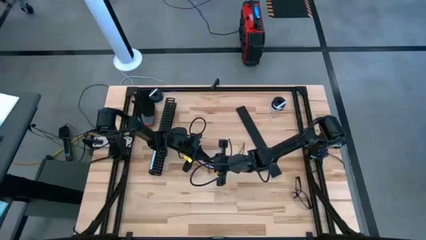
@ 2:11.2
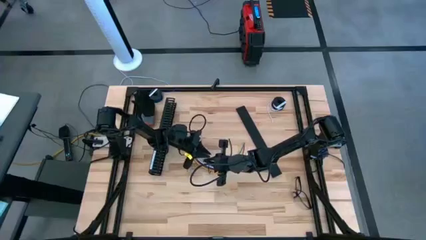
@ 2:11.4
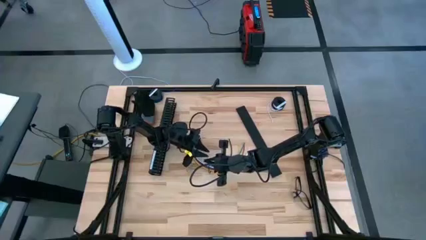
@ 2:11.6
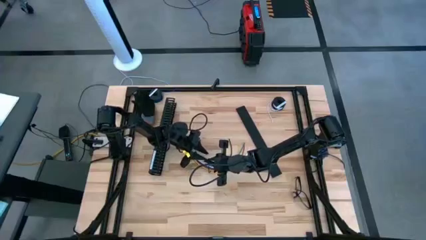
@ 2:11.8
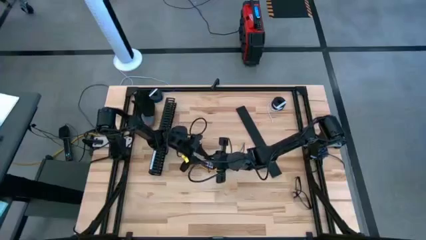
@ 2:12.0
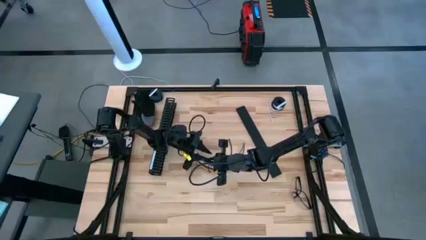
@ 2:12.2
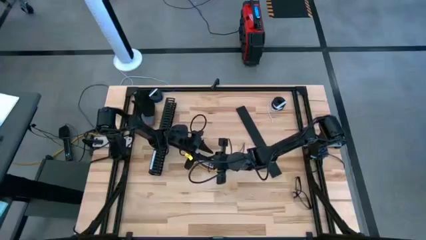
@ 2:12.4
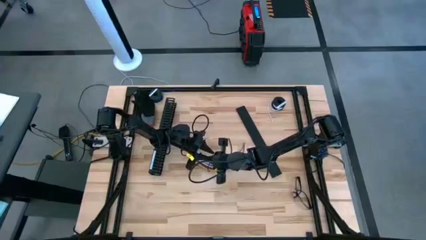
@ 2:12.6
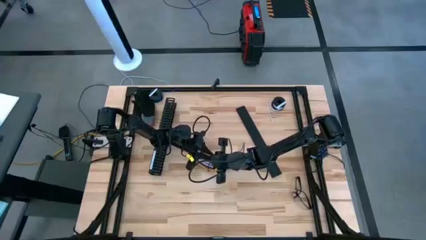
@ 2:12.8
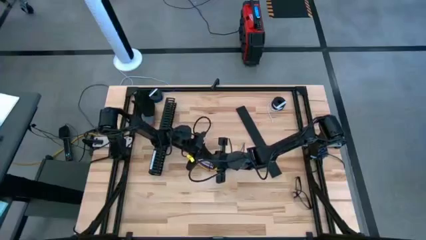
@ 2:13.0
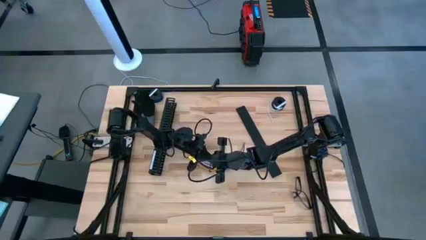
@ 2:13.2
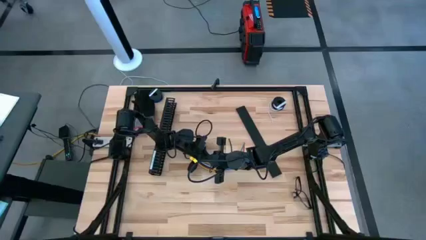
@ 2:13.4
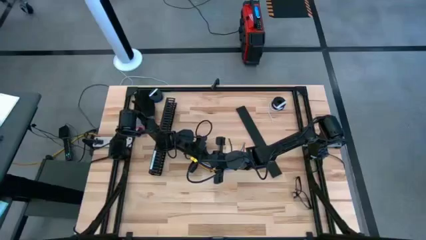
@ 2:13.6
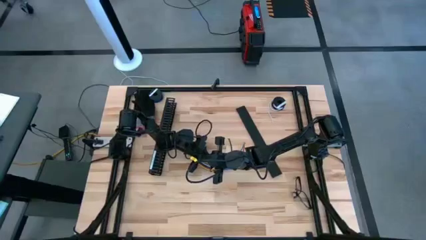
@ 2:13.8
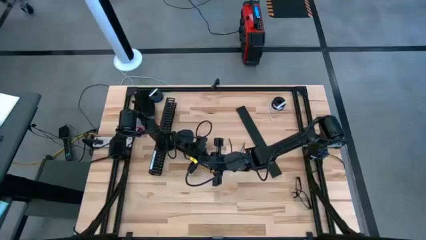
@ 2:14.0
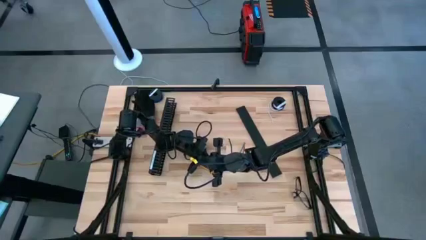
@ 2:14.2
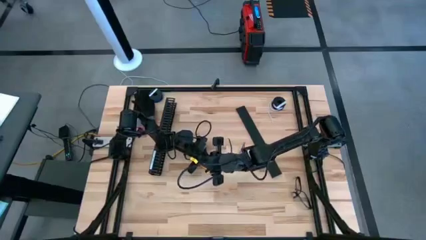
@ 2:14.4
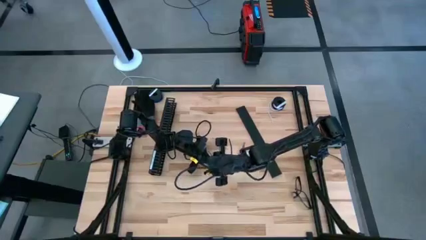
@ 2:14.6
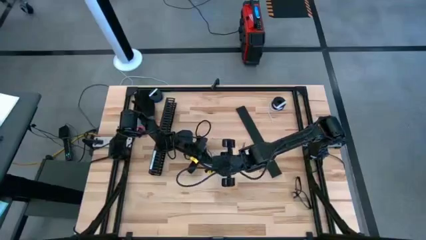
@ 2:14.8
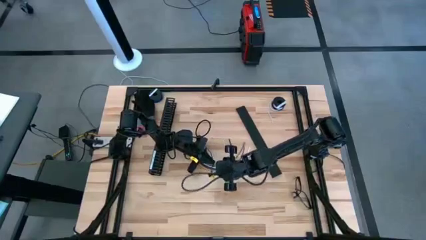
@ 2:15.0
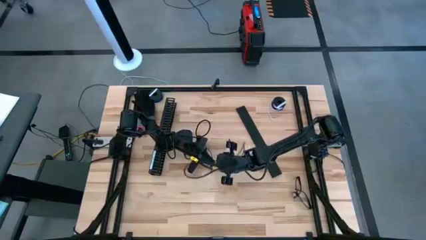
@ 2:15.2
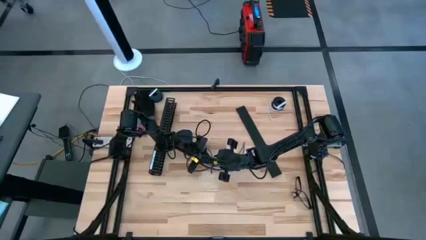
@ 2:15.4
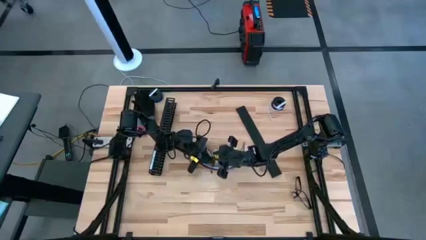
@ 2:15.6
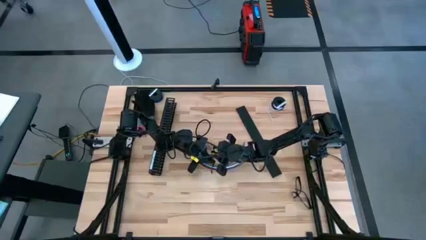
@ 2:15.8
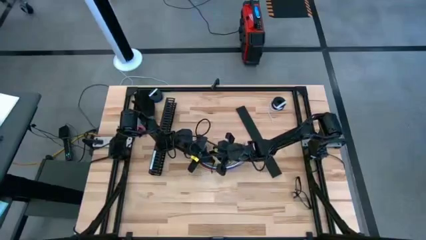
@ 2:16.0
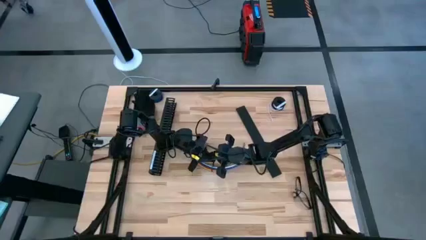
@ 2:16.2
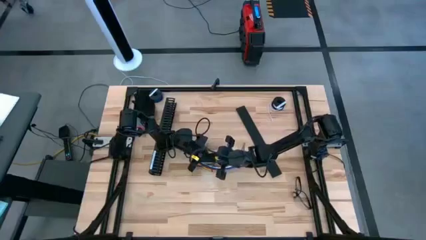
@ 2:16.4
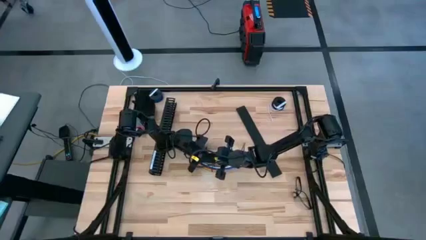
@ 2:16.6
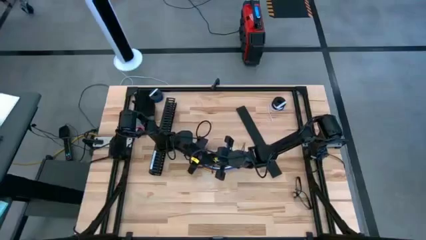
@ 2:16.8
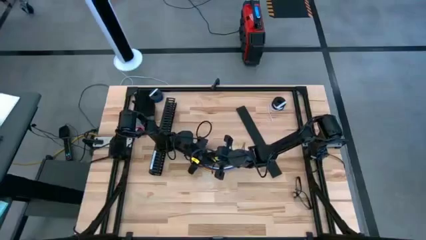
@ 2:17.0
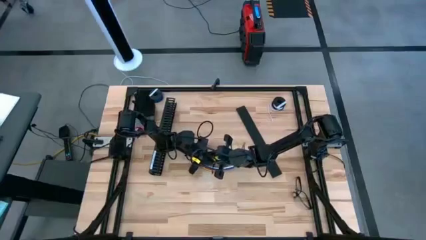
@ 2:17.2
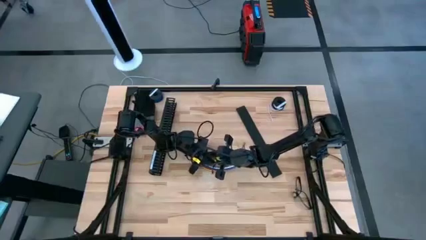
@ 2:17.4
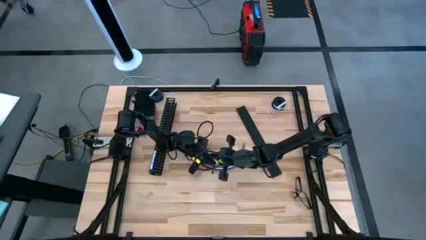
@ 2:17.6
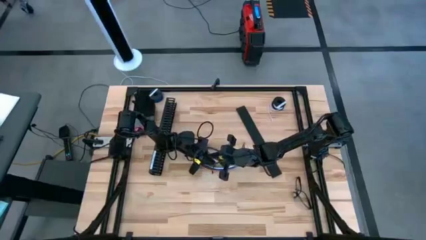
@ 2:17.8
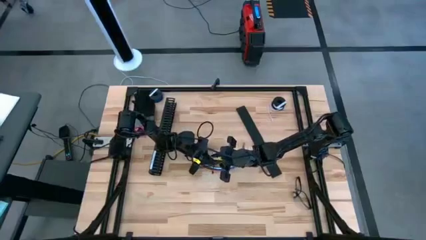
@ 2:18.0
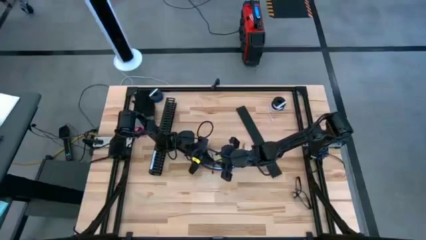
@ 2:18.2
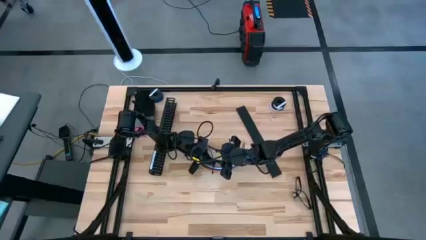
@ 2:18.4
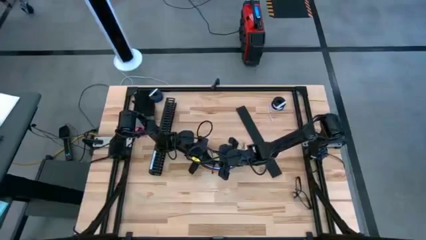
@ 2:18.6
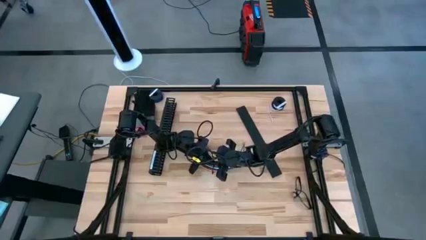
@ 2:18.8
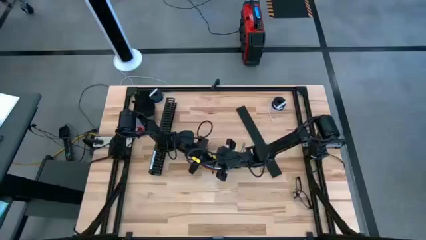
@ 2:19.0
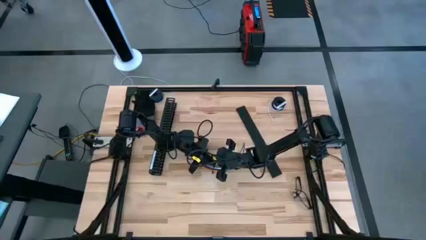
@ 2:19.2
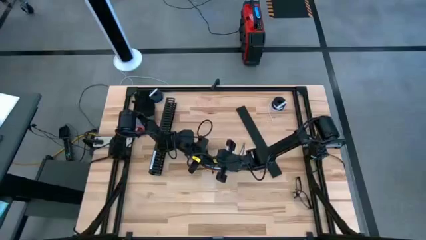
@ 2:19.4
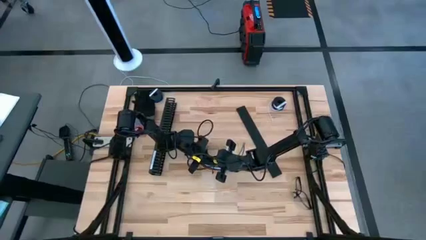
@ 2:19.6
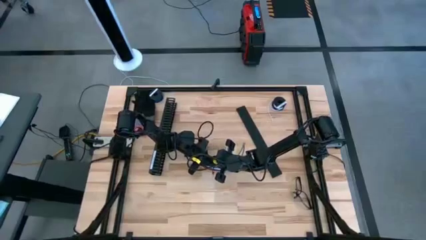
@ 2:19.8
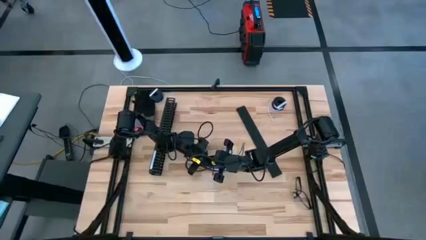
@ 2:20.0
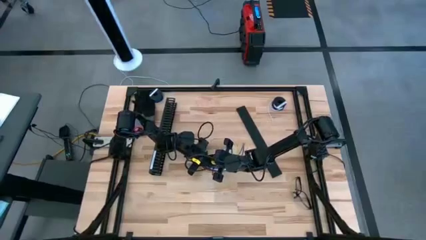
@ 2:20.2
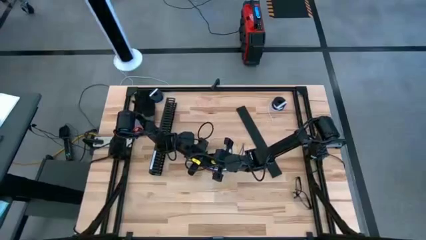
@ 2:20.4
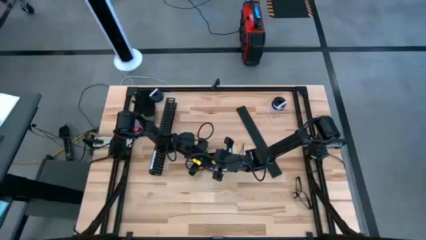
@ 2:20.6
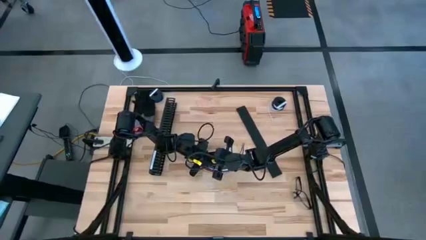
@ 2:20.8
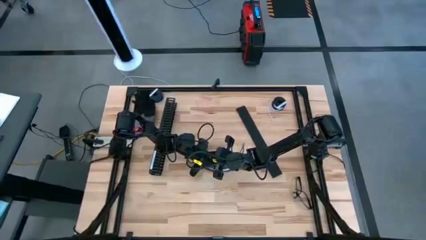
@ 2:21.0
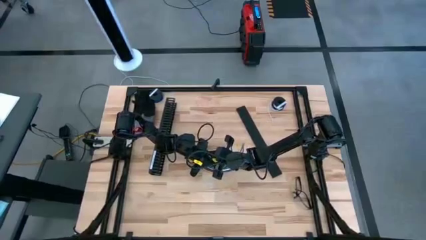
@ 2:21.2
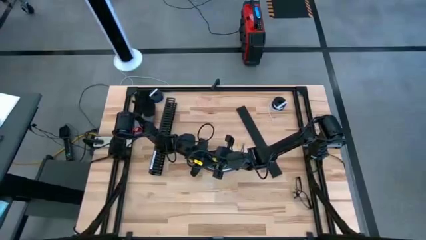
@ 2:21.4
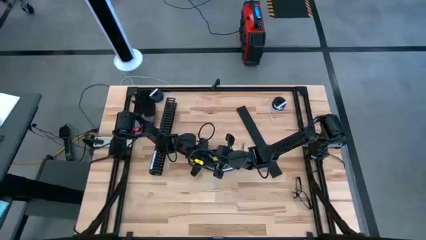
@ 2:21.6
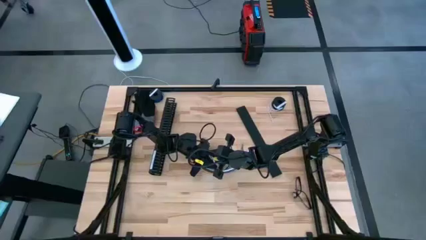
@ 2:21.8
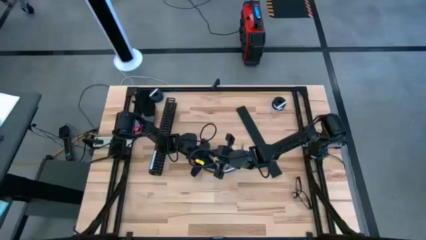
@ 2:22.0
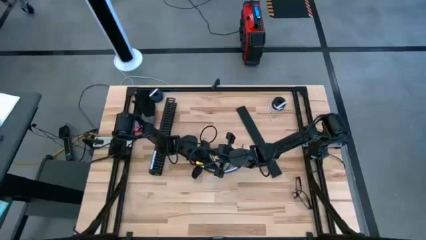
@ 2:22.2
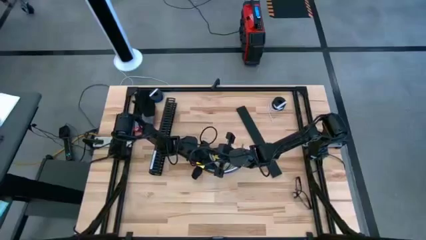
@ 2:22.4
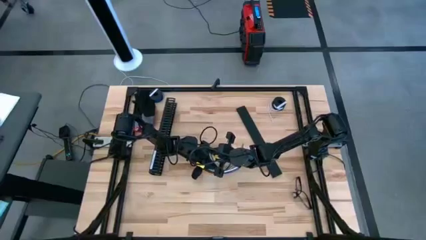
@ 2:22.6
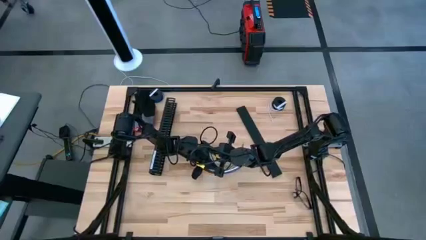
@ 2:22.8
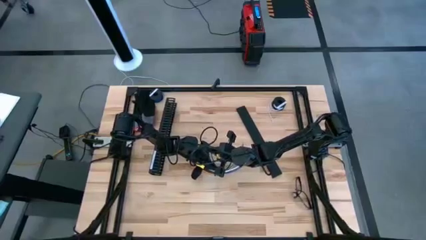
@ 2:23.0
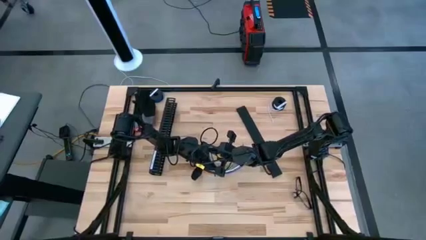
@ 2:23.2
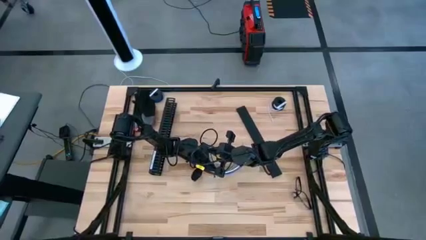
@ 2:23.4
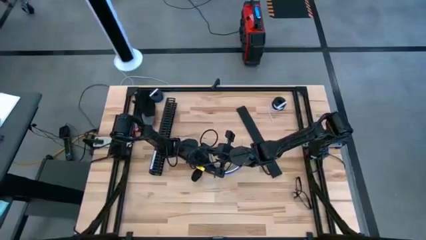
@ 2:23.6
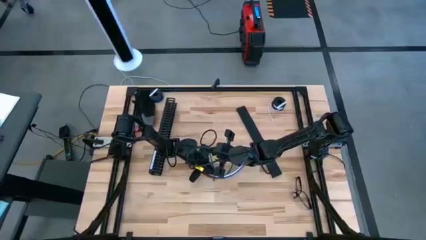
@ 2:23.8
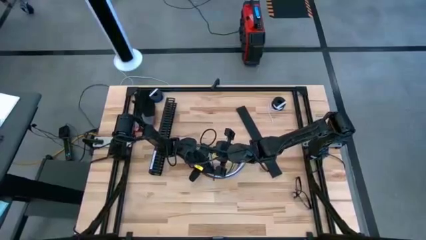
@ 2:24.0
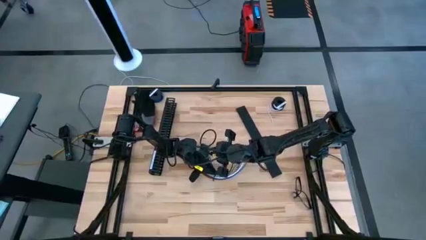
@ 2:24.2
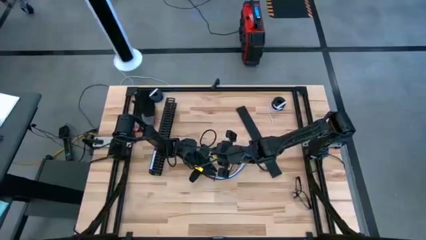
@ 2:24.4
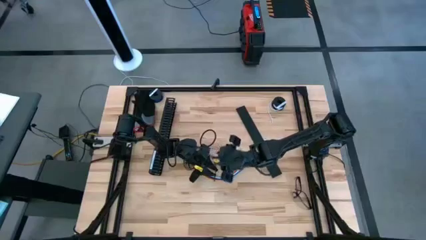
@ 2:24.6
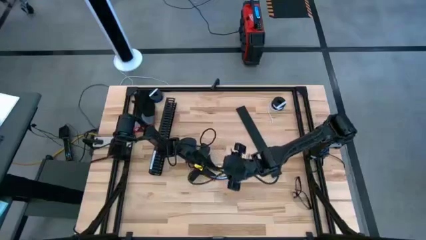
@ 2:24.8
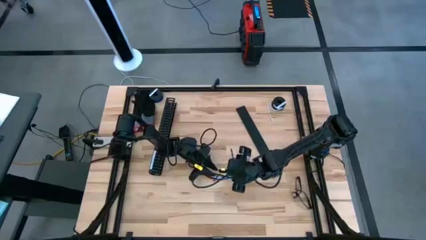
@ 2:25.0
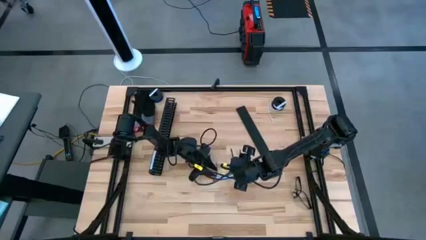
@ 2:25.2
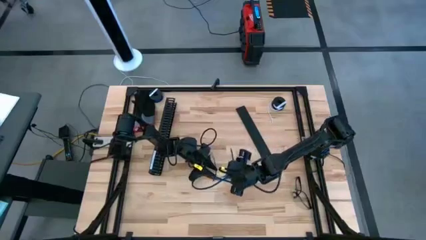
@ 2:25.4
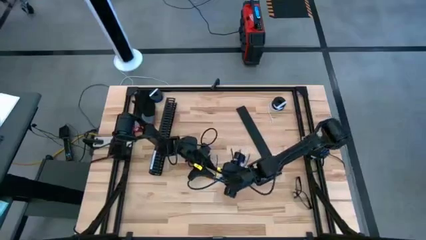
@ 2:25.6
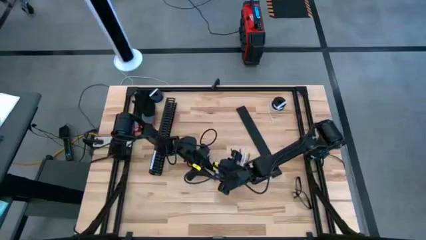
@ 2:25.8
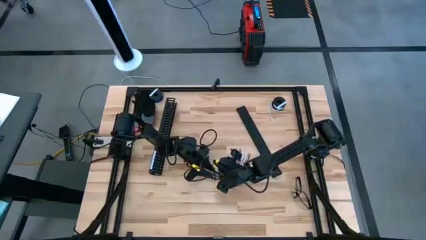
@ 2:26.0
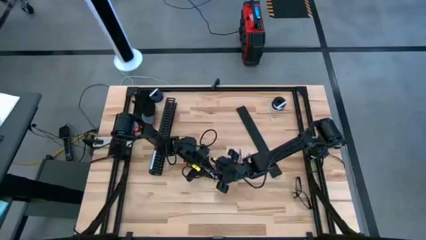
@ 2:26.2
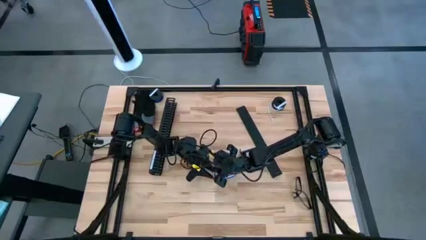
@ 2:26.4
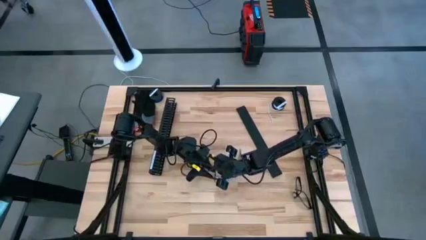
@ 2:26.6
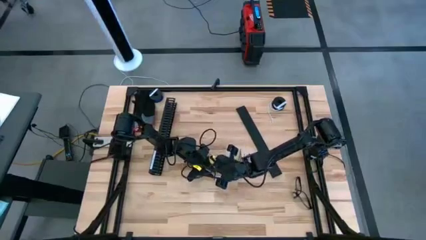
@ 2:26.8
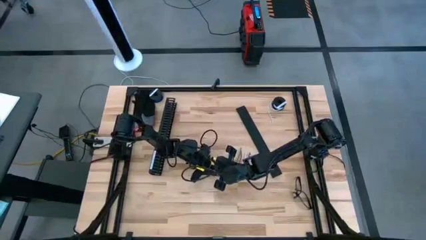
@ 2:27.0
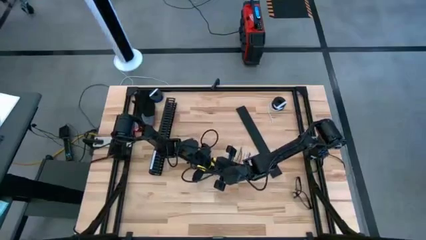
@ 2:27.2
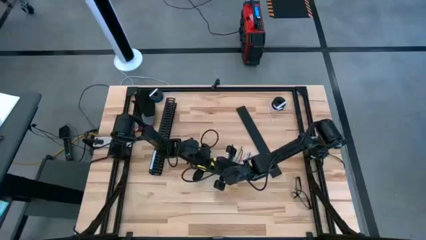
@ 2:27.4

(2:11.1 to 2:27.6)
Task: Ziptie cables
Wrap the black zip tie on the cable

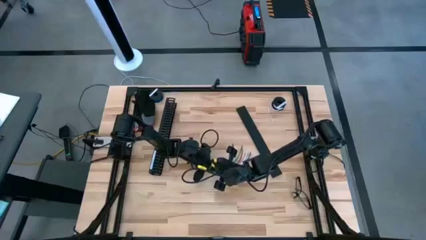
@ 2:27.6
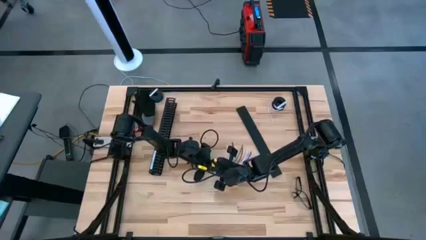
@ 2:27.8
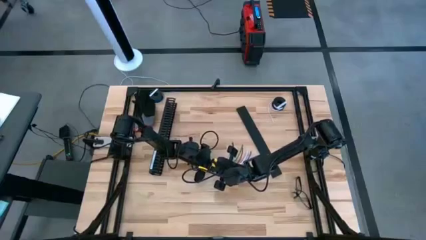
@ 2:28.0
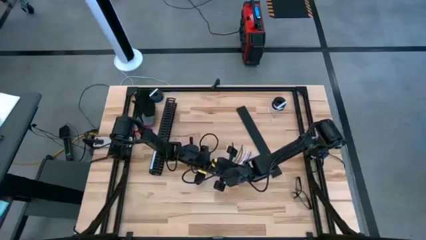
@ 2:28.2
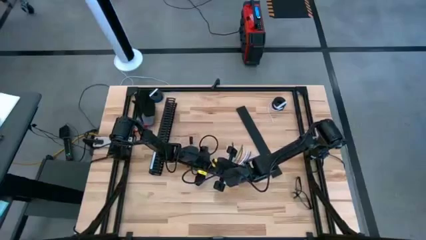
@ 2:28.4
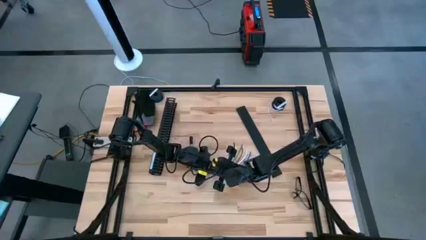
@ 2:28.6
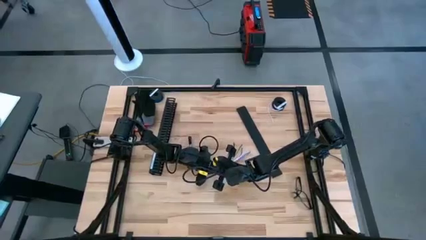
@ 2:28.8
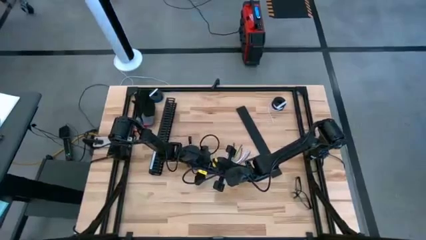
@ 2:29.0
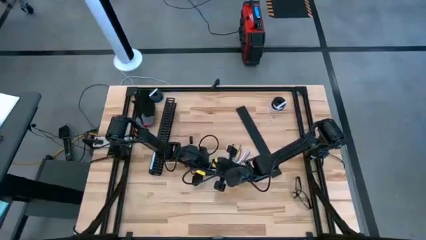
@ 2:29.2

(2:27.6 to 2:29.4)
Wrap the black zip tie on the cable
